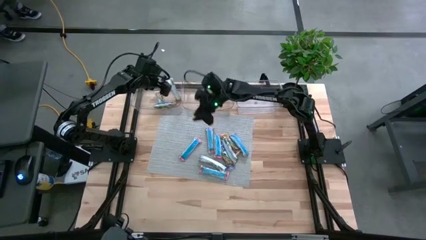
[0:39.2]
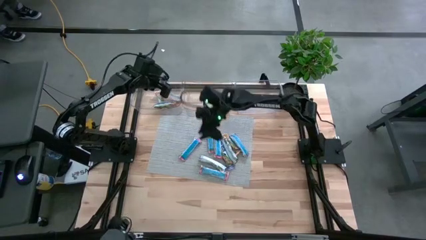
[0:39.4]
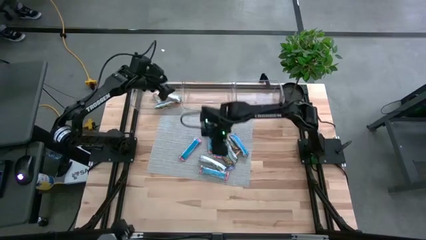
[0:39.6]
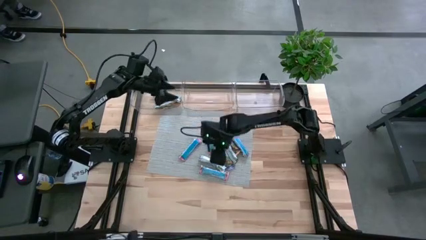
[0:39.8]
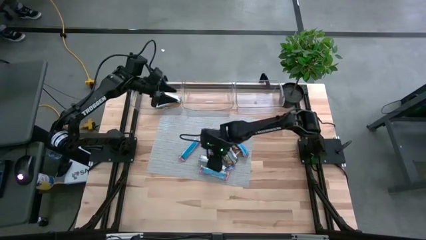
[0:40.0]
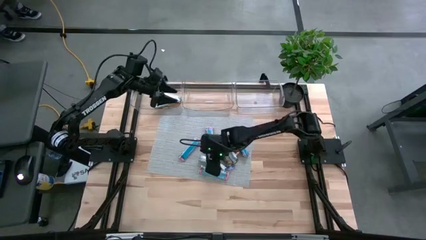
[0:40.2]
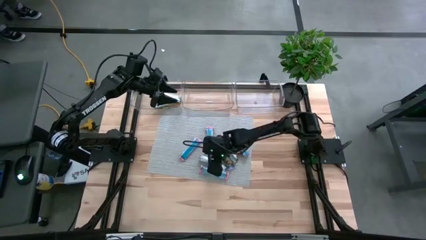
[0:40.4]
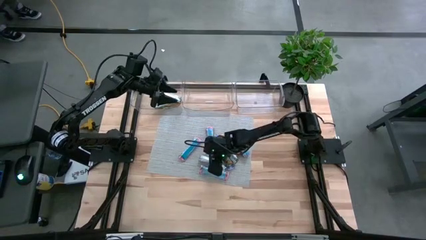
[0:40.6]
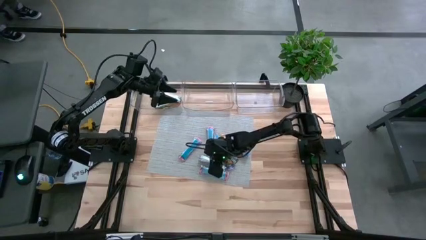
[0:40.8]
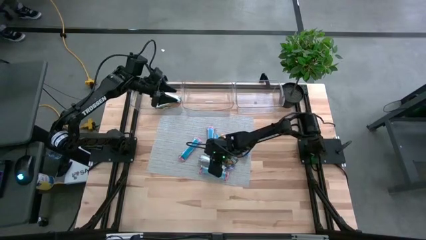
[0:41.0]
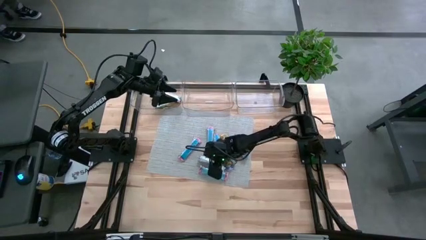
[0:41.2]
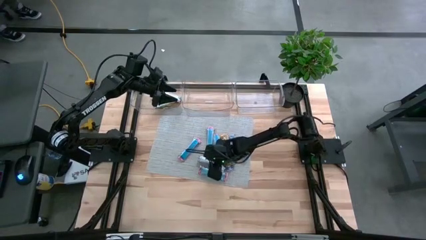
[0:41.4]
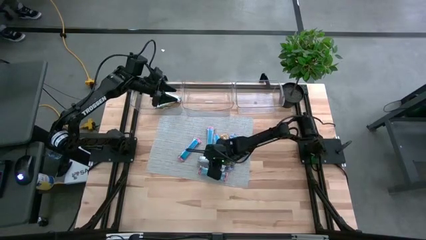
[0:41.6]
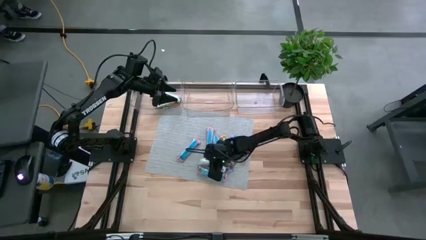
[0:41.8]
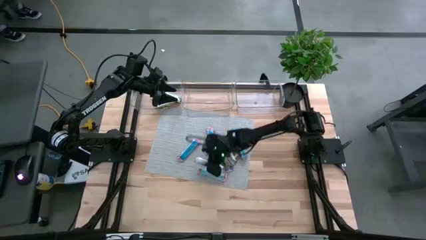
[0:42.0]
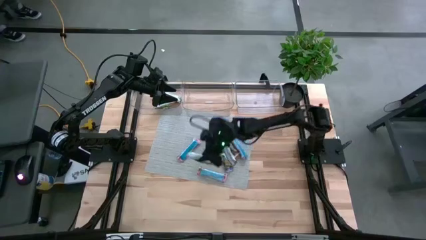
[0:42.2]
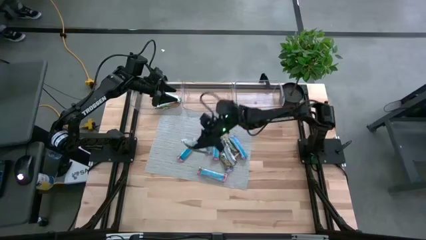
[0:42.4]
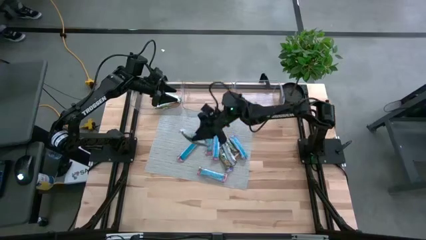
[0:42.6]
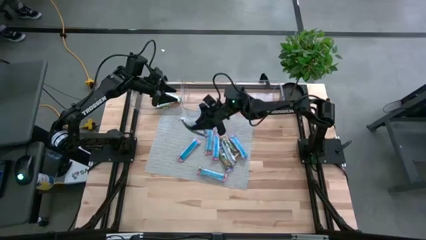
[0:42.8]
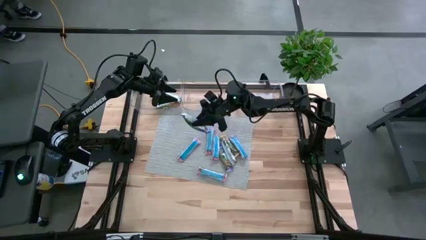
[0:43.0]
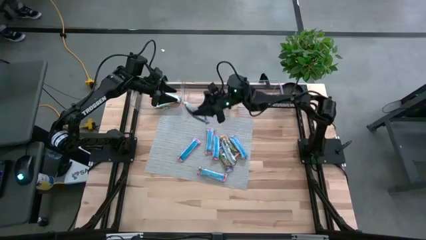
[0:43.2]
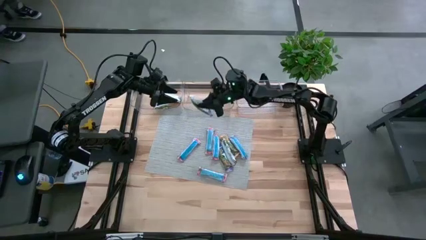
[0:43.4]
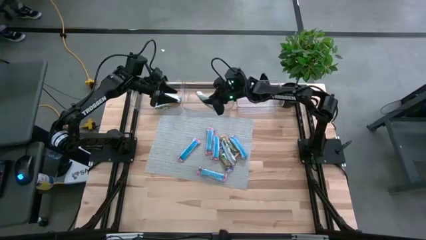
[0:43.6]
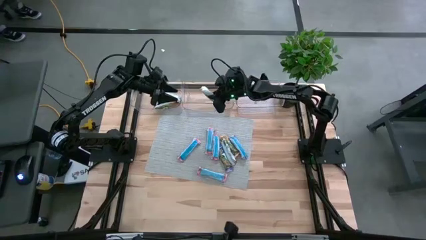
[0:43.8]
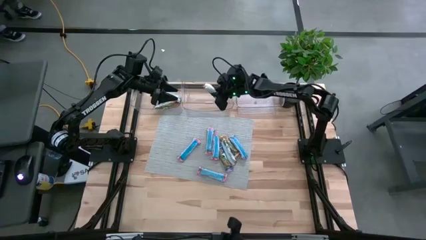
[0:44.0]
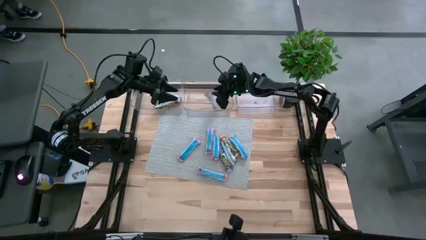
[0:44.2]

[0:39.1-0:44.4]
Task: Pick and place Granola Bars by type
Put the blue granola bar into the middle transparent bin

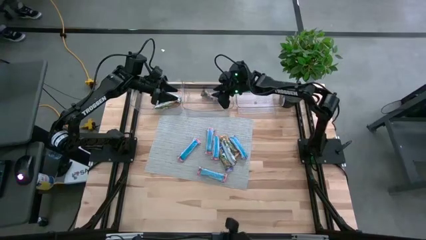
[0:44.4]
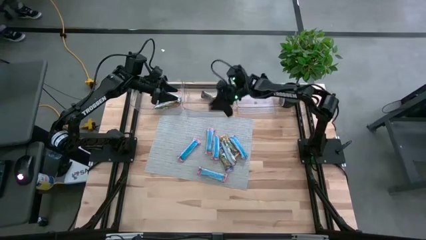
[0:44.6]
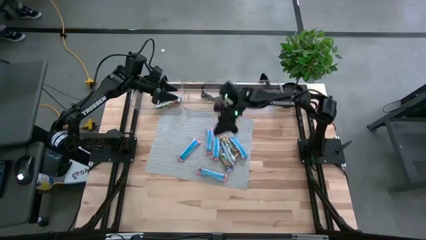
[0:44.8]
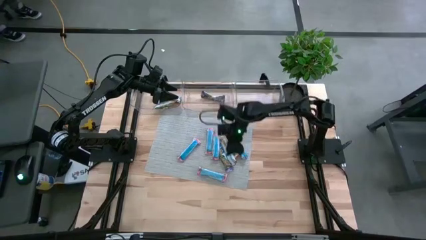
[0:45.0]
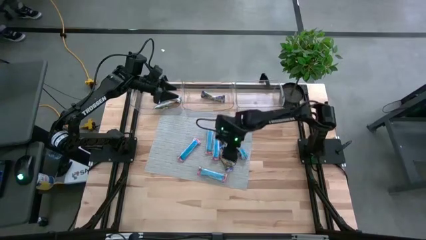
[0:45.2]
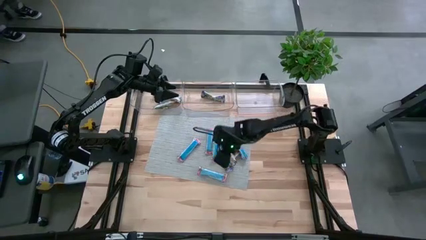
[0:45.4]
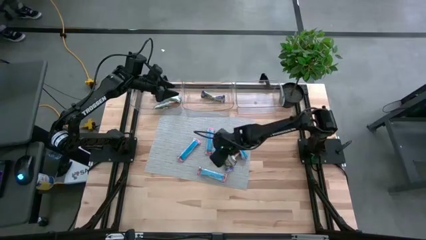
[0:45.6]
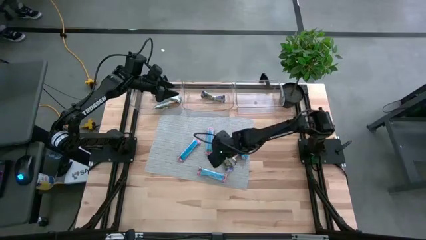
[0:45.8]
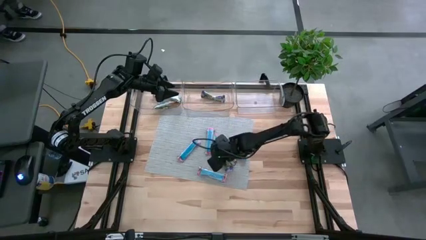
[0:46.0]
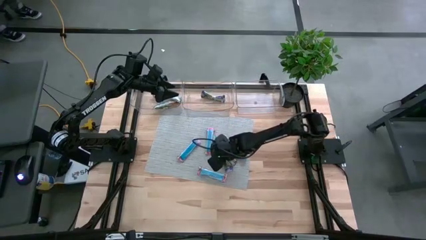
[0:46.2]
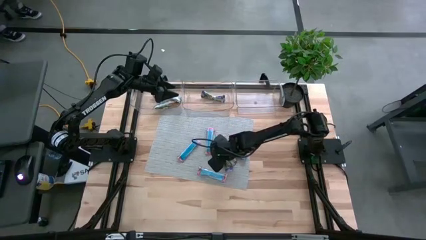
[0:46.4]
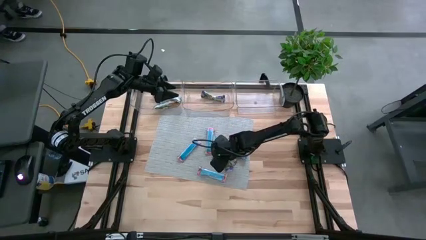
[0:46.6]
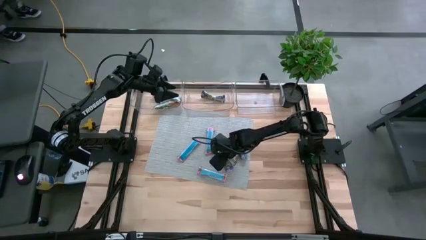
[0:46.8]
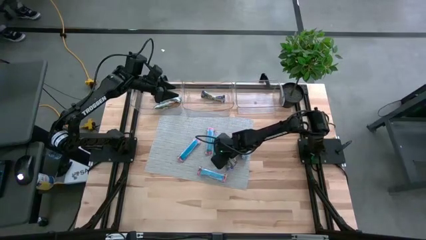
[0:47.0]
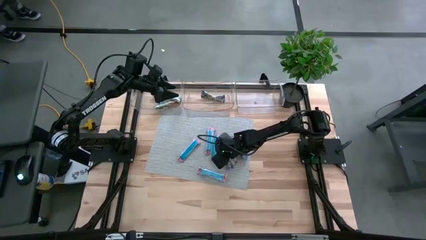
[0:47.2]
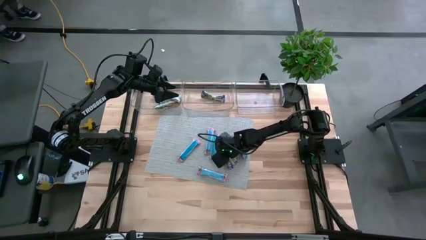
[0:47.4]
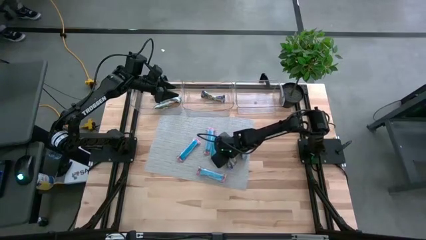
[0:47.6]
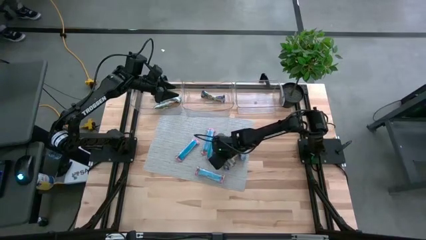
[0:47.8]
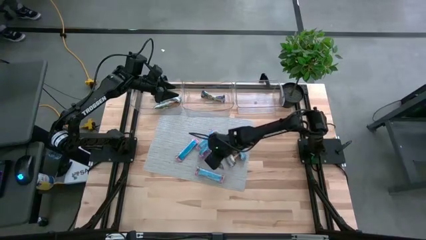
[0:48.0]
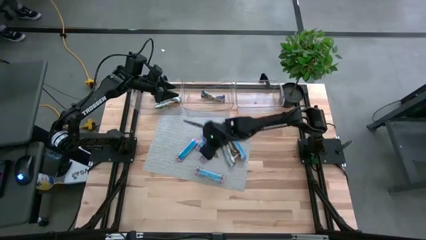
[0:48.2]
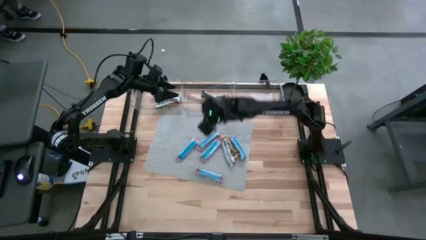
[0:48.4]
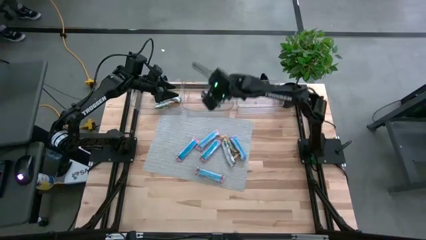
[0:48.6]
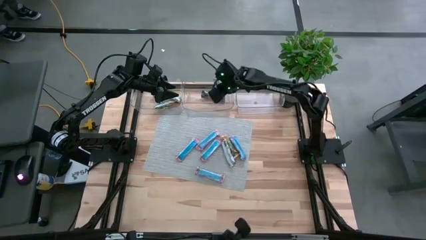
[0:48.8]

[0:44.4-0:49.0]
Put the blue granola bar into the middle transparent bin

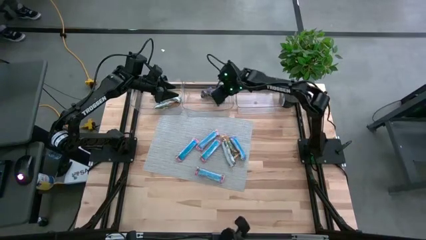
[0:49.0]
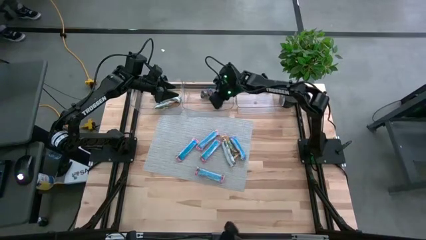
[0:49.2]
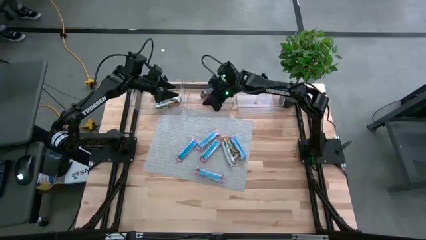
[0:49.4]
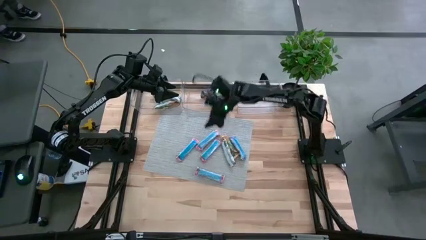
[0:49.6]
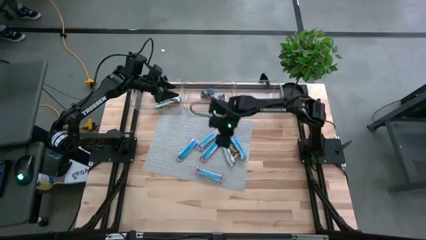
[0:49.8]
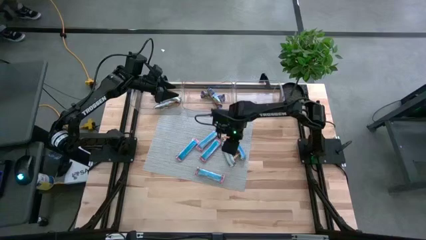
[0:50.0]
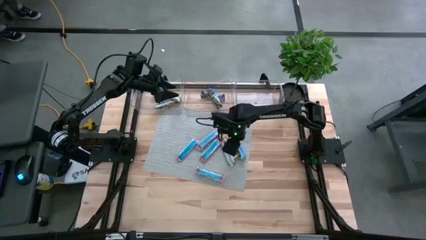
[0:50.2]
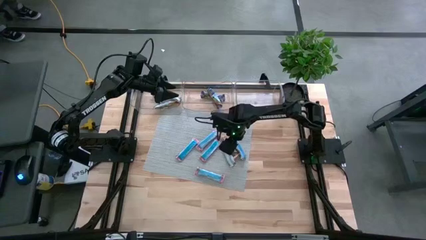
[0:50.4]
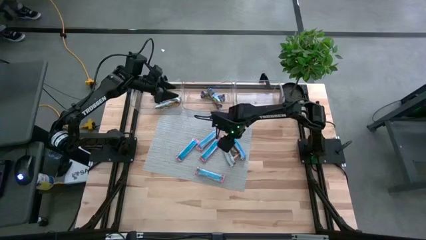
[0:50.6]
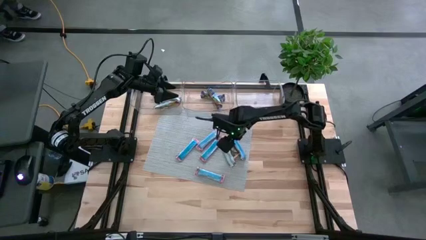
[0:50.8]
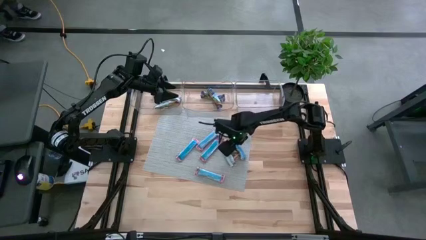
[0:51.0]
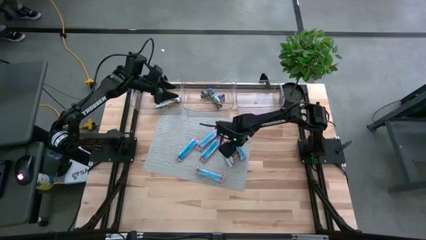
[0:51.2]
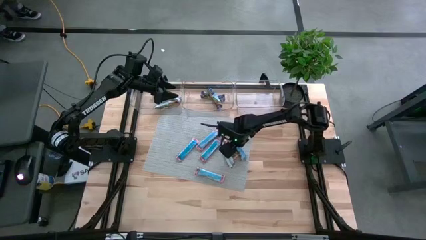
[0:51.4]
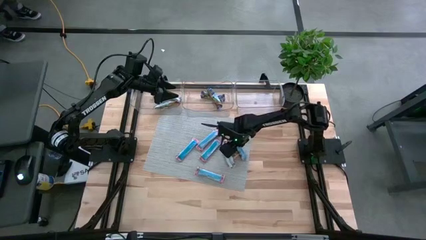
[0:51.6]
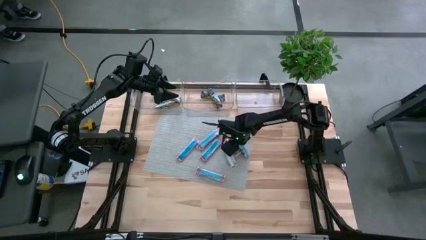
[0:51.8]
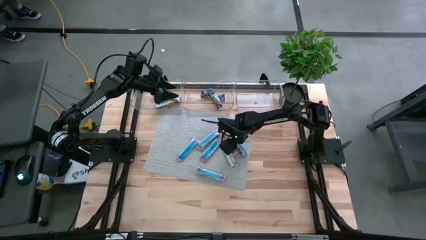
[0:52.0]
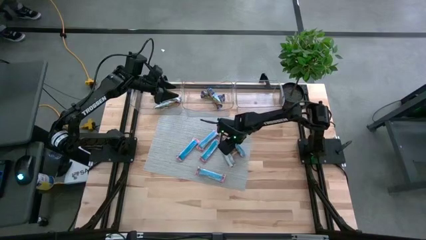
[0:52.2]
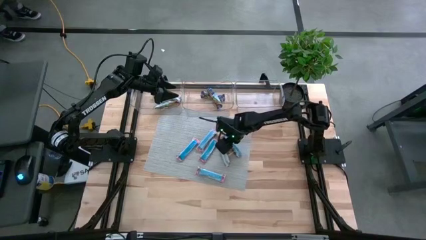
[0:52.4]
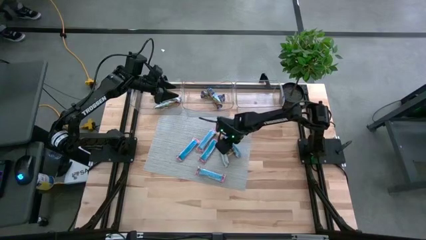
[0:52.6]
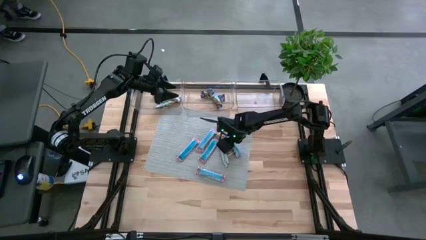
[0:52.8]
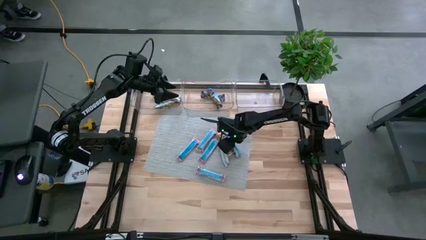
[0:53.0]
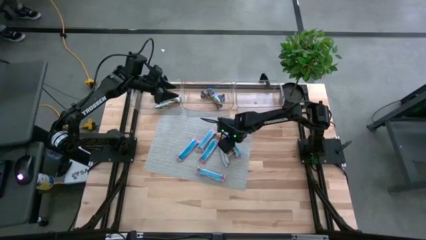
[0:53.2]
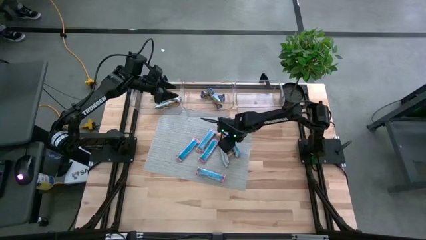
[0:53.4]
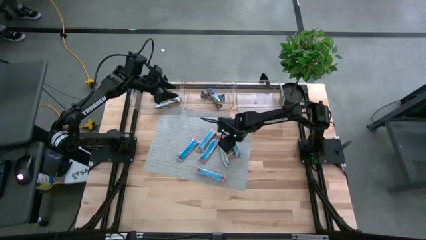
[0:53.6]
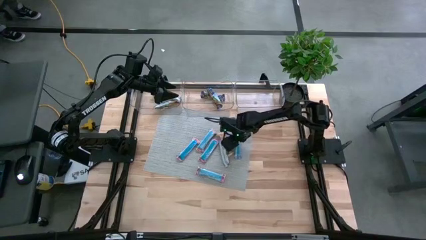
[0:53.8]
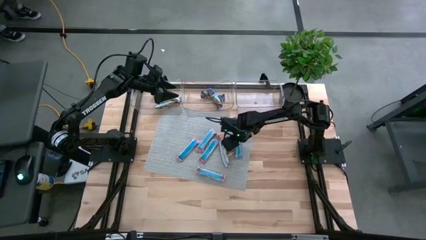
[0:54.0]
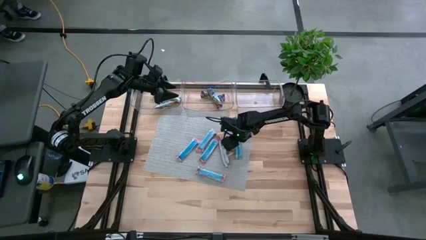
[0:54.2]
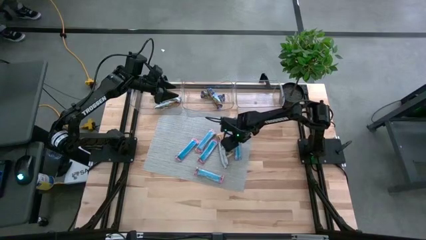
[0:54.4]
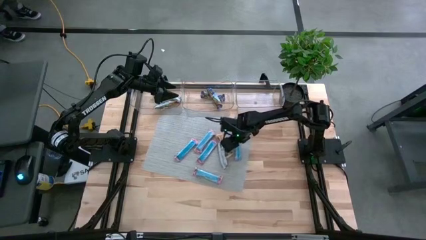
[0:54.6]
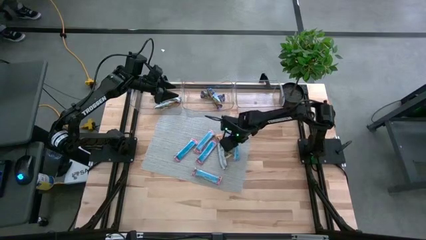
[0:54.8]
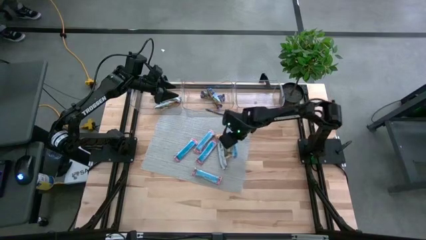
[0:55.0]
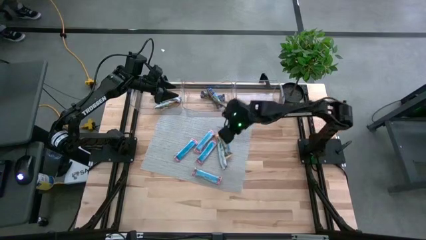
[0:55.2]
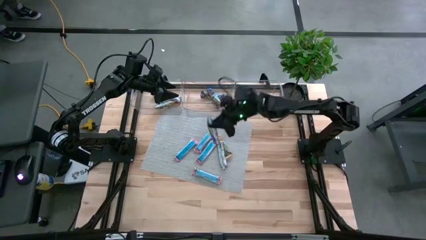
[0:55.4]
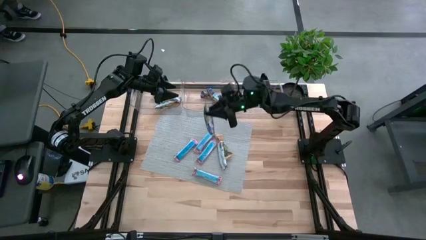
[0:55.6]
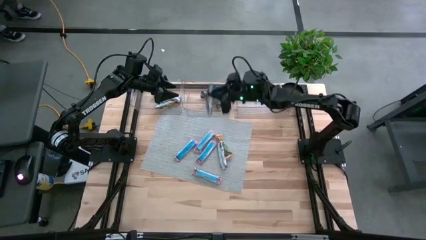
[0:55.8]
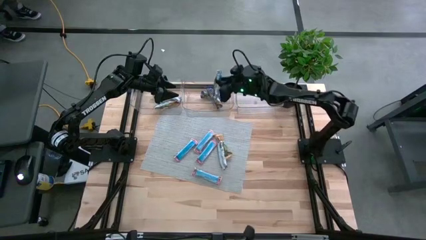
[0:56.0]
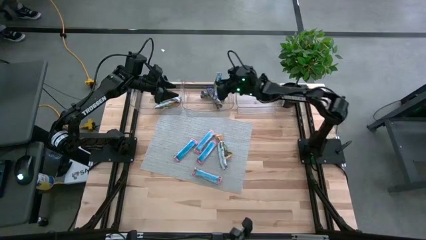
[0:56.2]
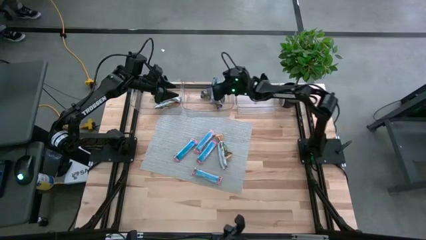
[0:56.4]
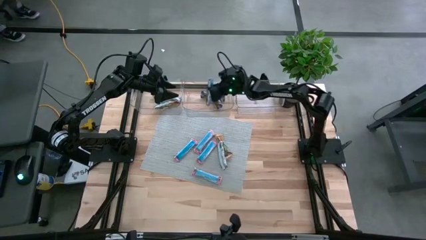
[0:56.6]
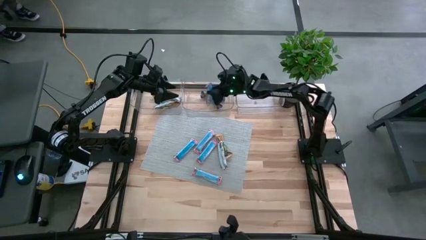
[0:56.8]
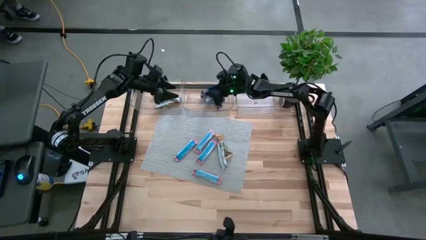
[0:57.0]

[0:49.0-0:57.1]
Put the blue granola bar into the middle transparent bin
